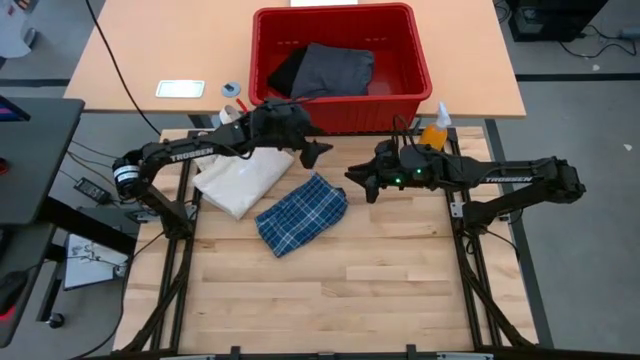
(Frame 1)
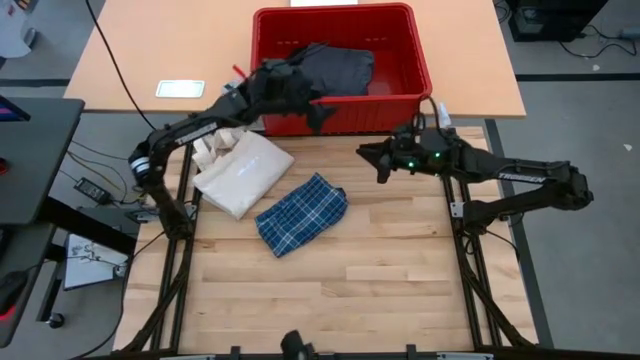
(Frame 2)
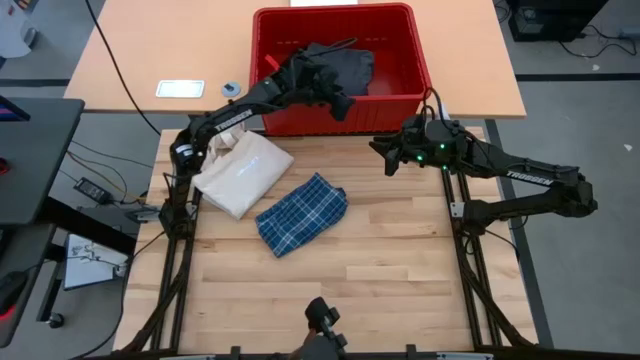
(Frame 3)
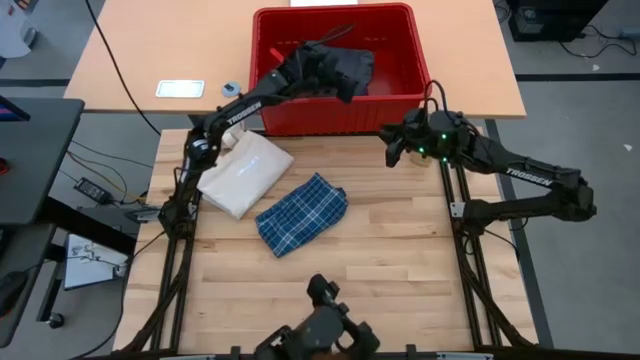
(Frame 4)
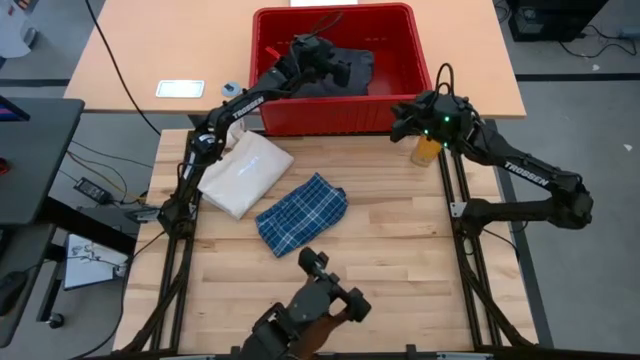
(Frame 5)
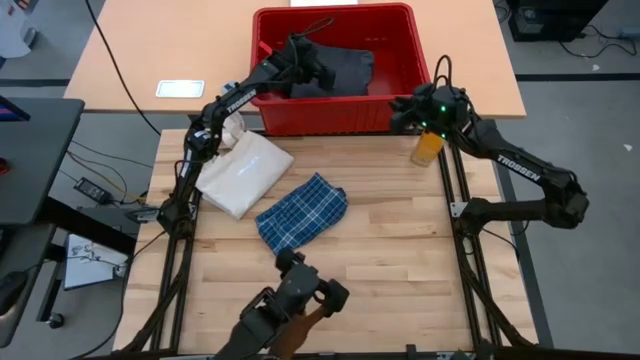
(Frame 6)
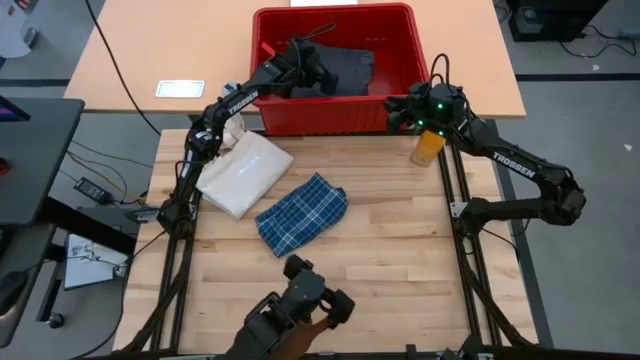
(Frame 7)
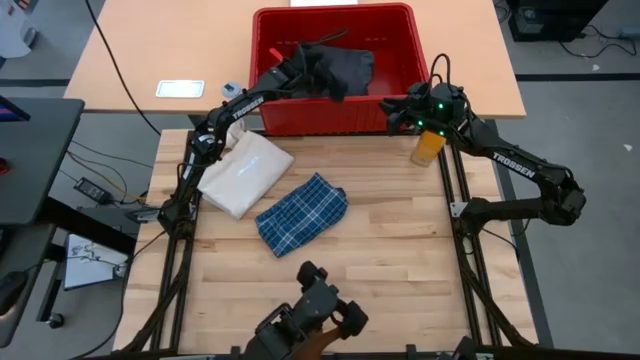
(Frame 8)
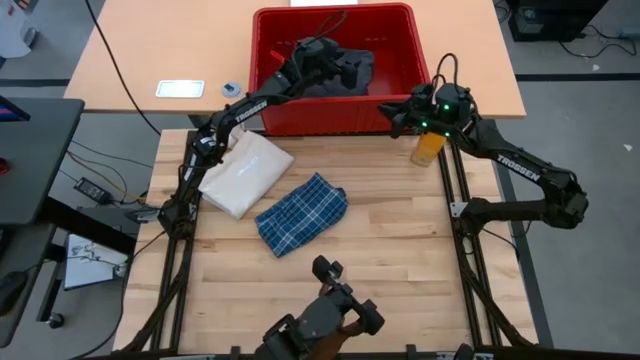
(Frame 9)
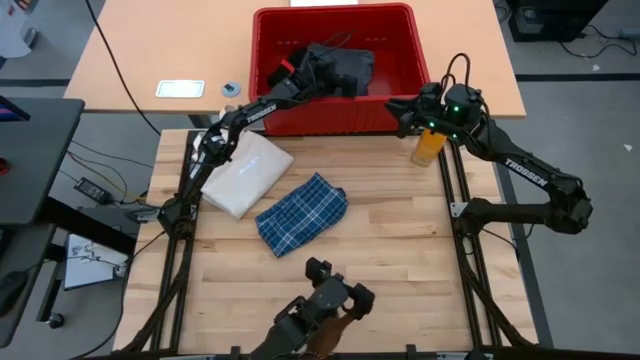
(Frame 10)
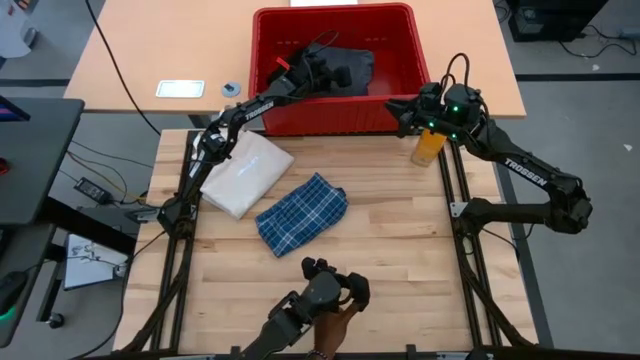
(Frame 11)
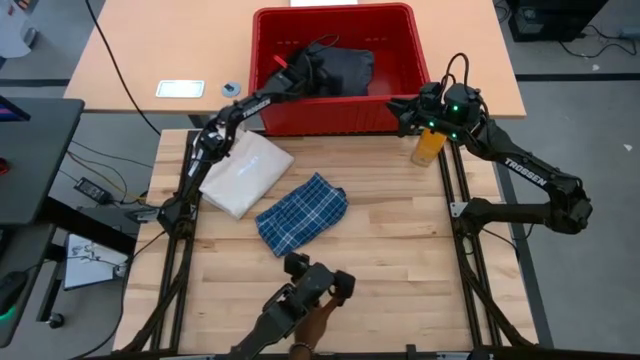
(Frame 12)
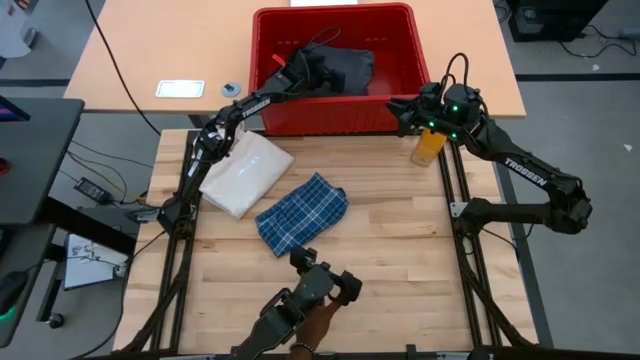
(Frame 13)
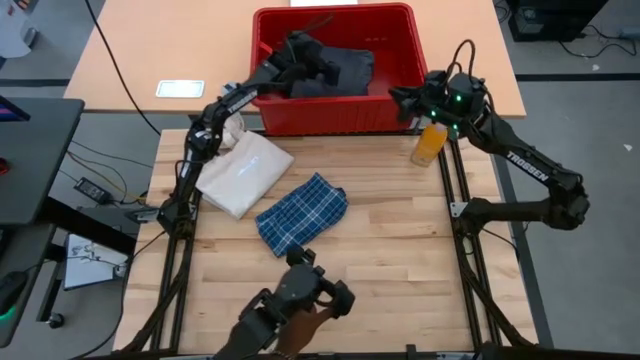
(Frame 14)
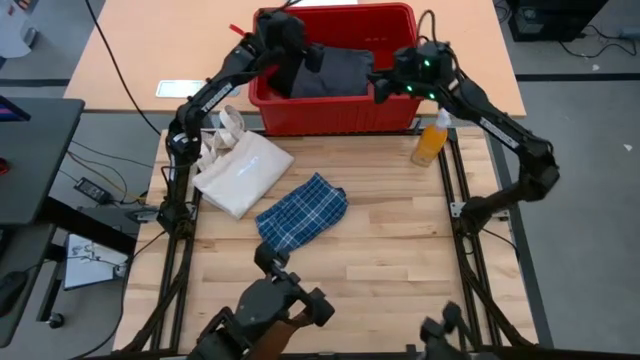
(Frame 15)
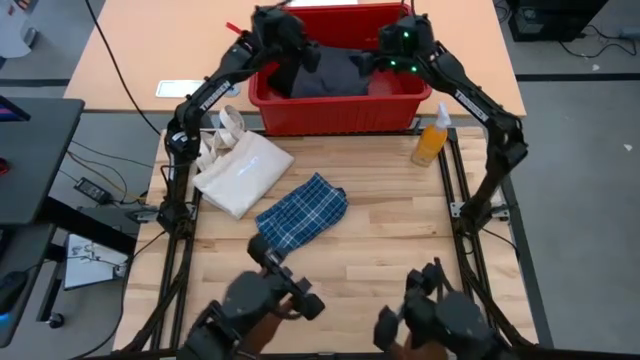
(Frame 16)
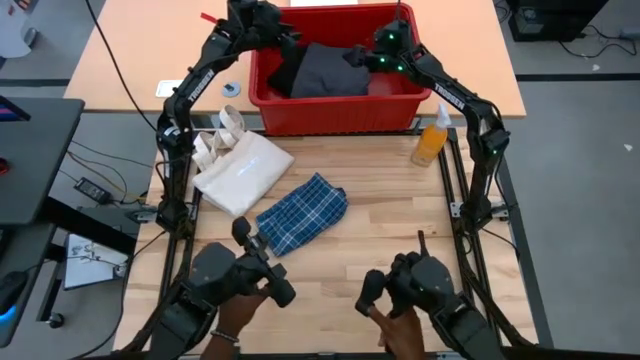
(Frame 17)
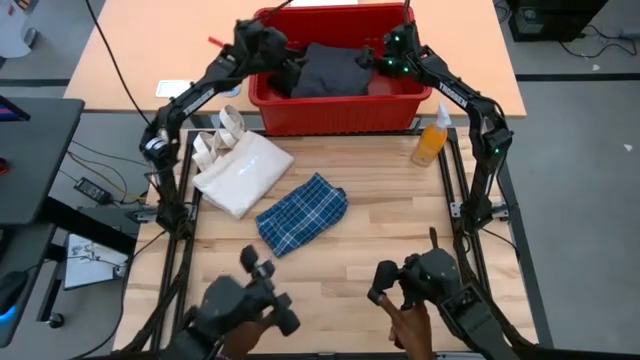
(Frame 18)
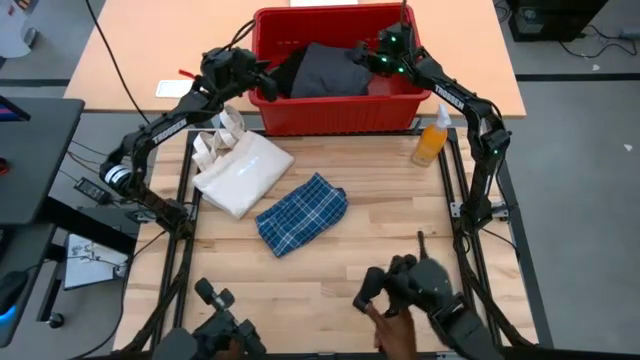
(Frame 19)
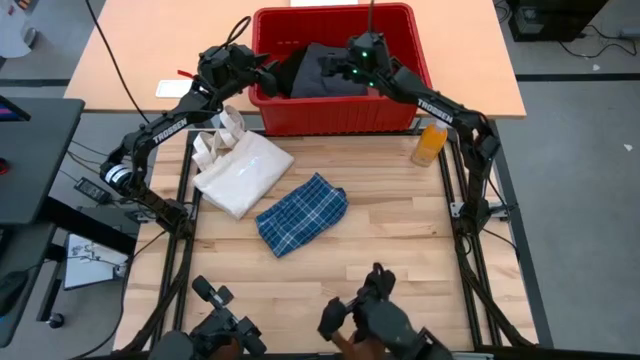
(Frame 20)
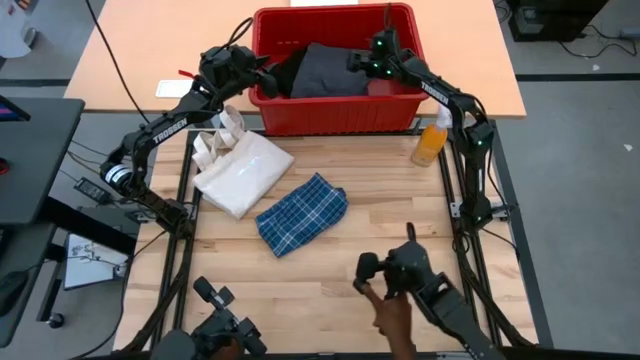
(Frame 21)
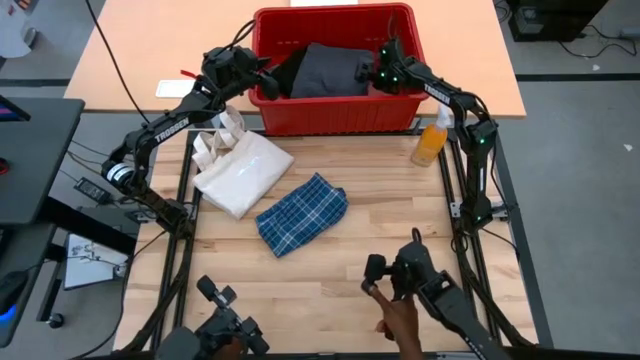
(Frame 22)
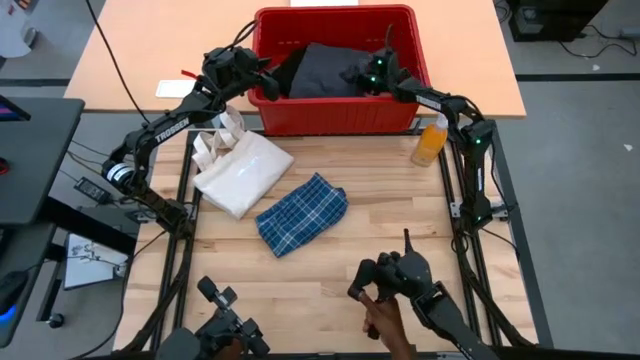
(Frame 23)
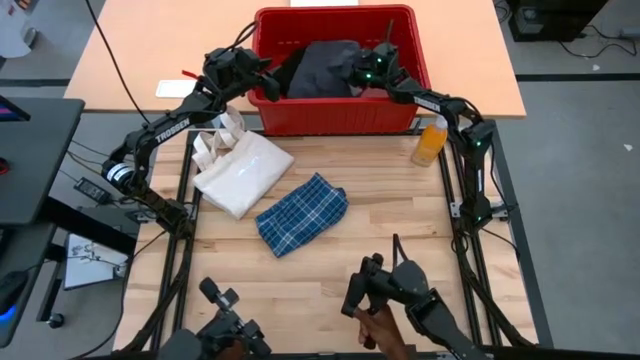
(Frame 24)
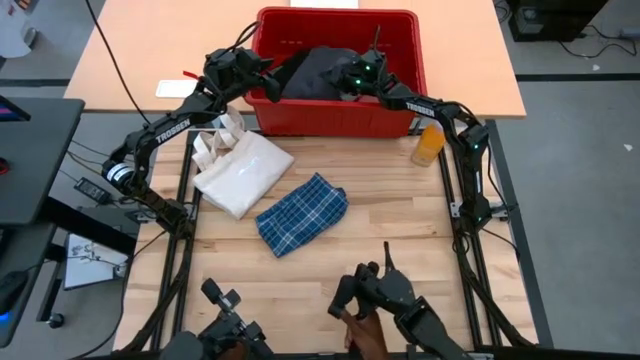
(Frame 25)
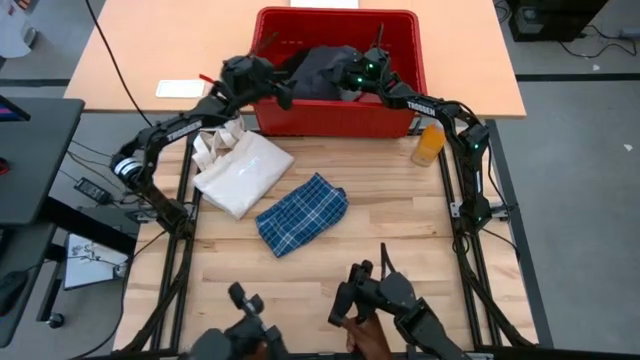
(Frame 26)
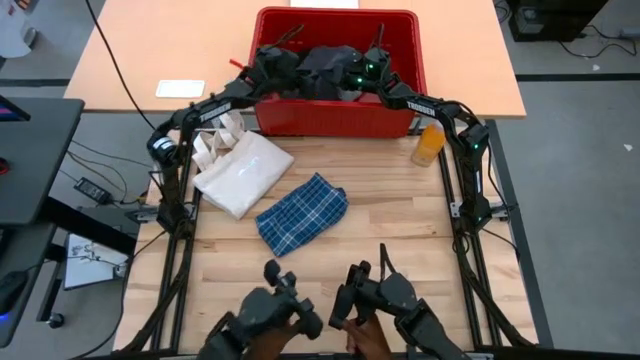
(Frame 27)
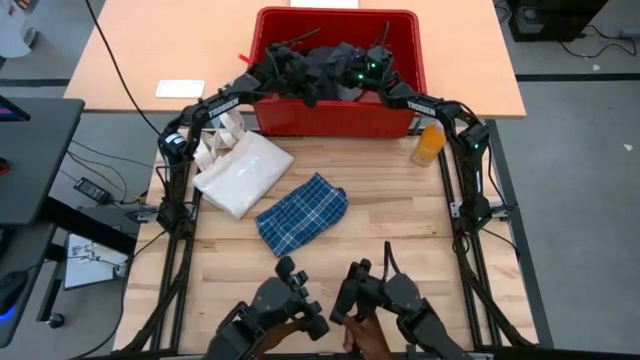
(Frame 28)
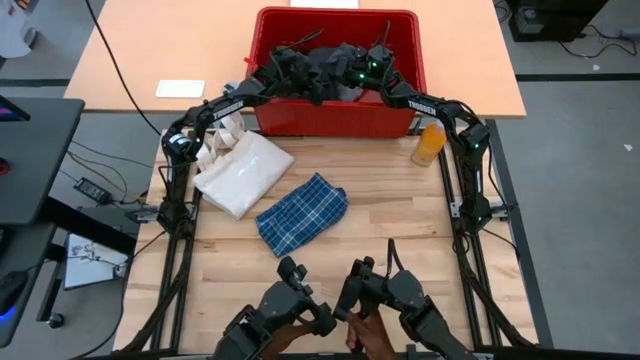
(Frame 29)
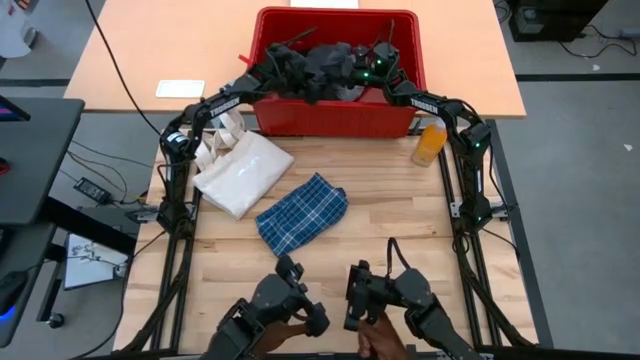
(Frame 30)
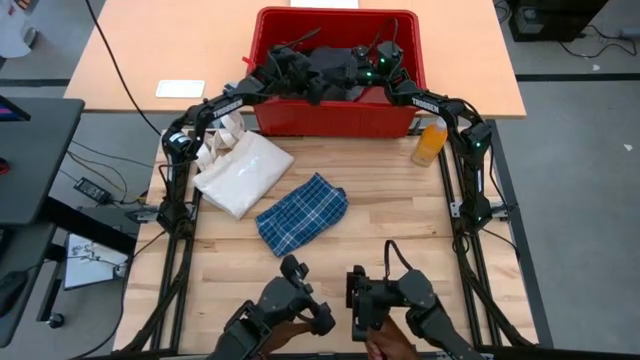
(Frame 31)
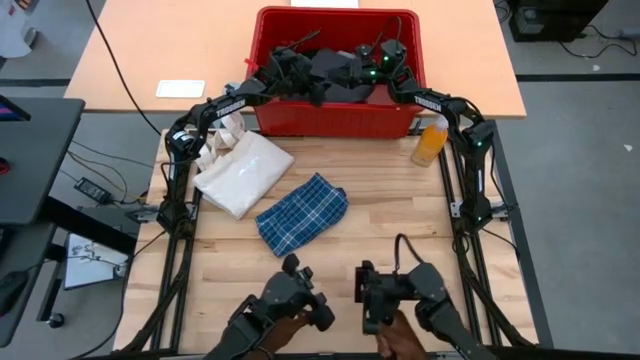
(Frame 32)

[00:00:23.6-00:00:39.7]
Task: Fold Laundry from Bin
Remove the dark gray shorts from the red organizer bin

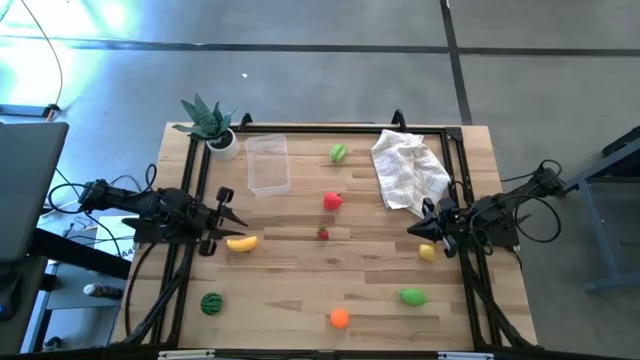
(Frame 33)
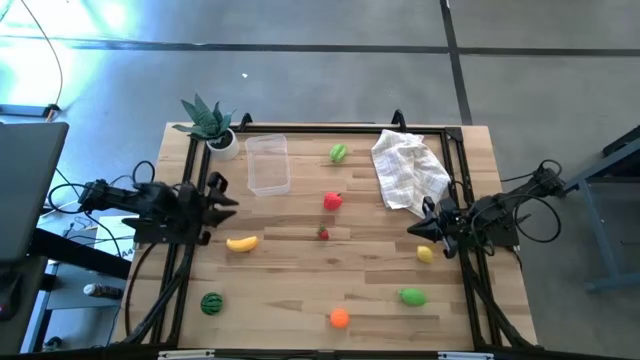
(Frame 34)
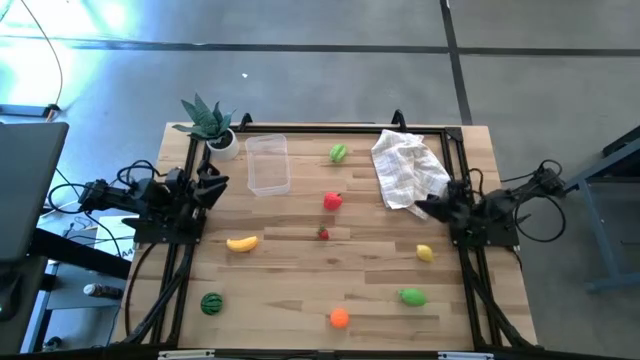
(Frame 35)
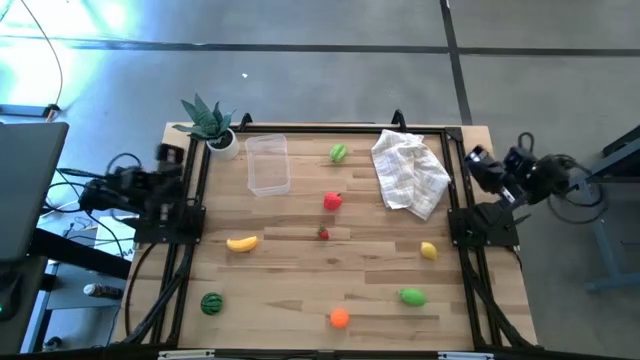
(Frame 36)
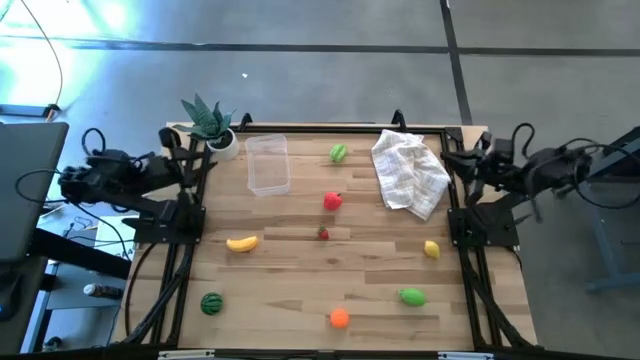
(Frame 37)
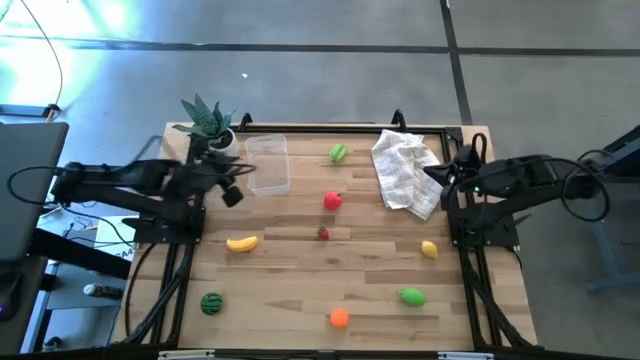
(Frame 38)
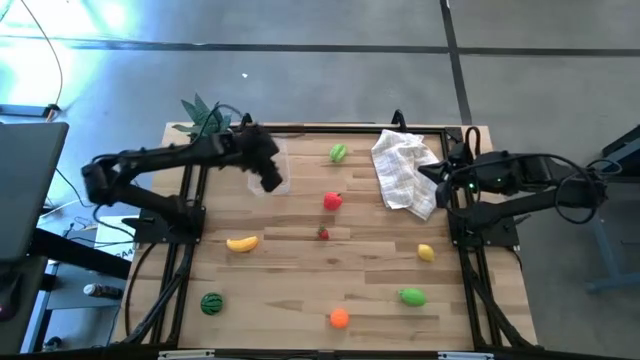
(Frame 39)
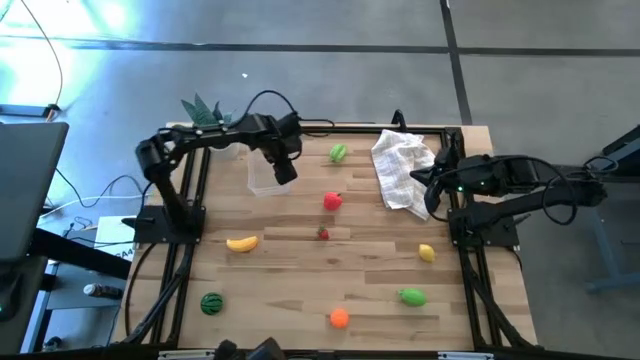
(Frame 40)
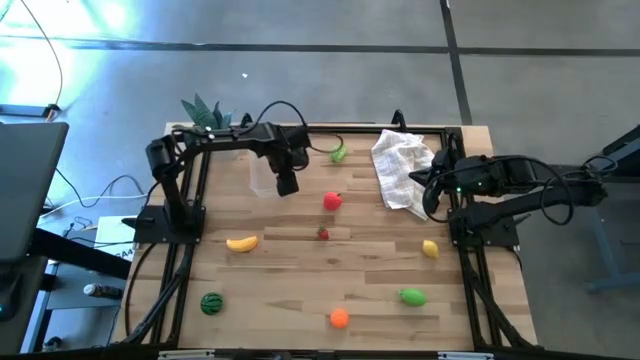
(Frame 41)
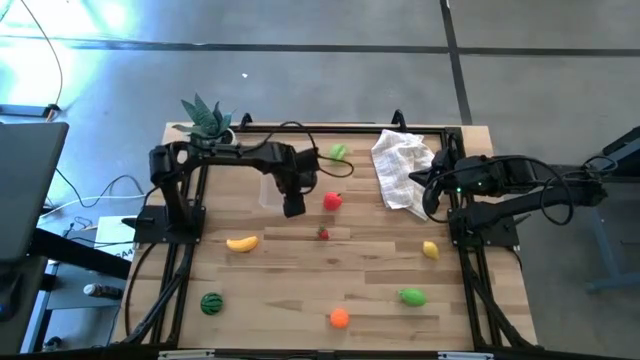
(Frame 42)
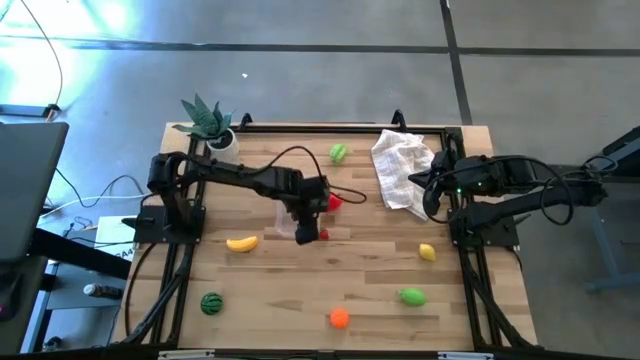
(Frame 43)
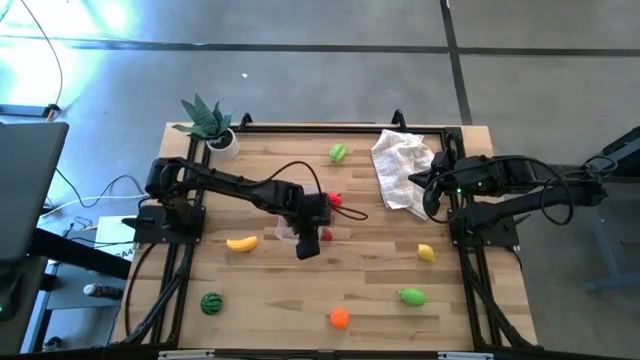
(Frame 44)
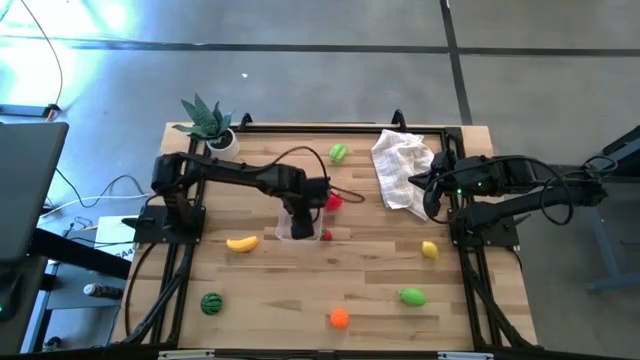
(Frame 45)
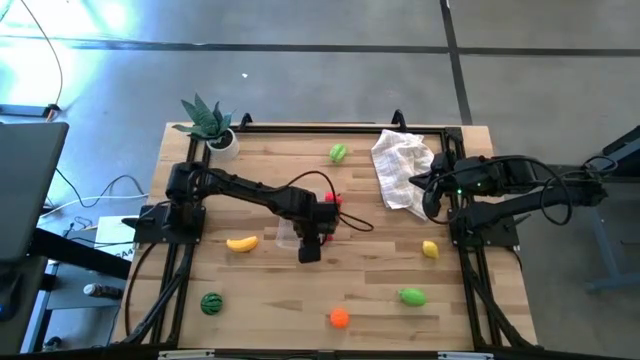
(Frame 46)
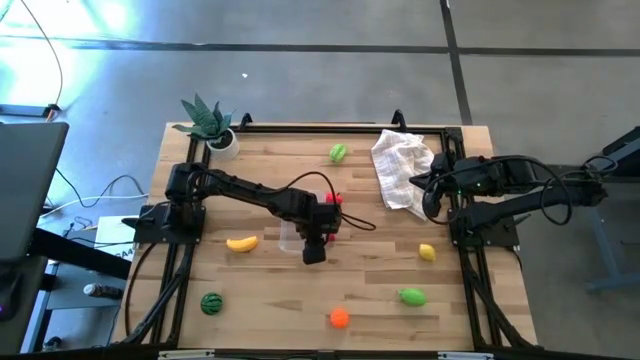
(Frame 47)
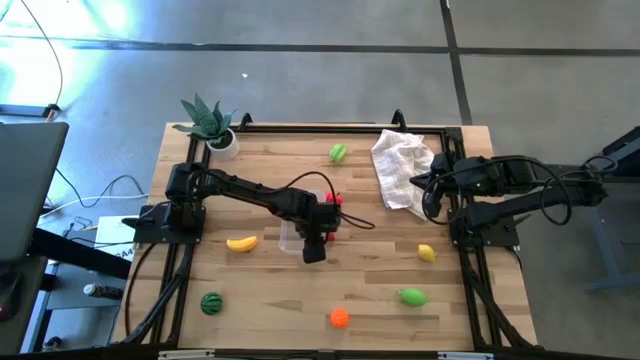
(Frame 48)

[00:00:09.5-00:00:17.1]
Task: Pick and placing Produce into tupperware
Move the bin to the center
